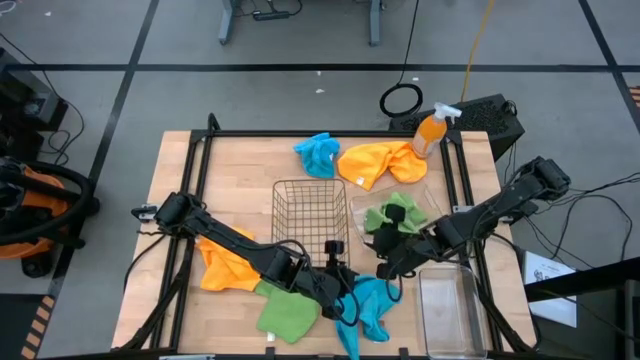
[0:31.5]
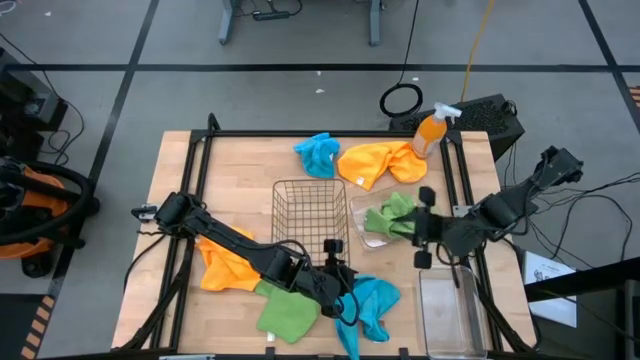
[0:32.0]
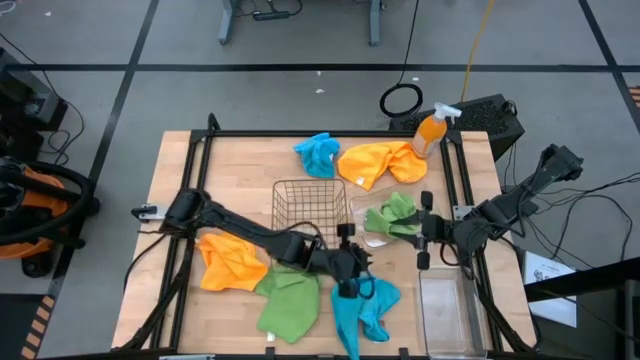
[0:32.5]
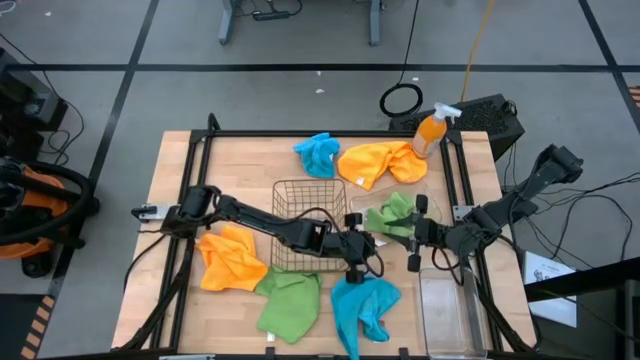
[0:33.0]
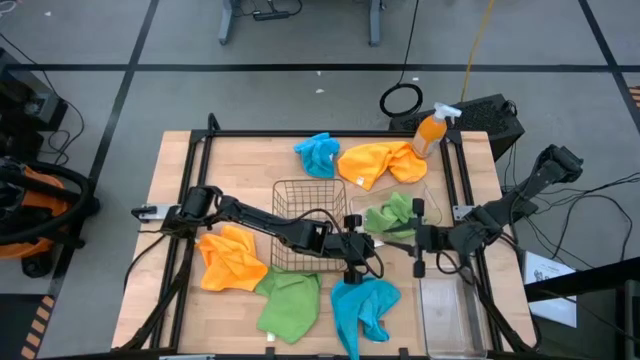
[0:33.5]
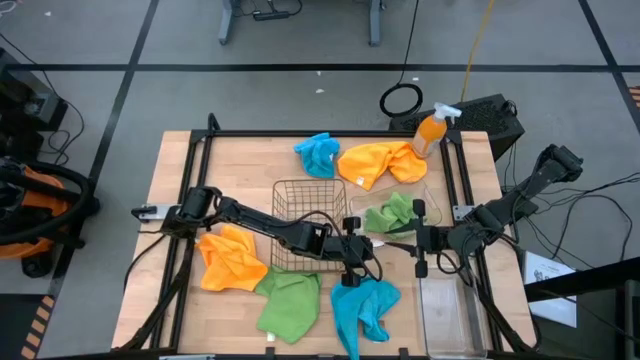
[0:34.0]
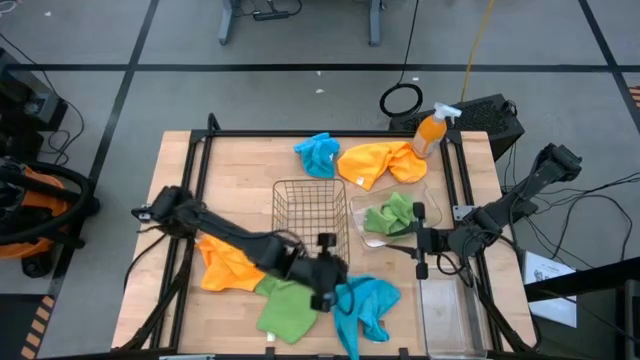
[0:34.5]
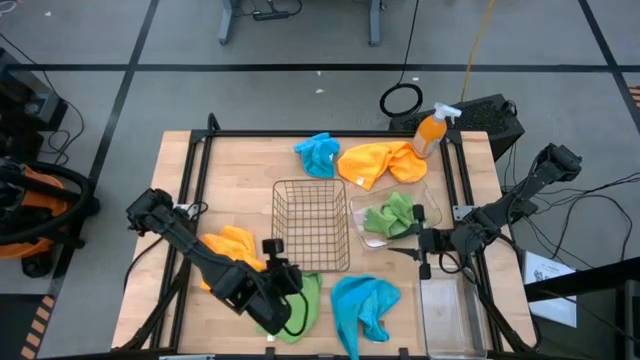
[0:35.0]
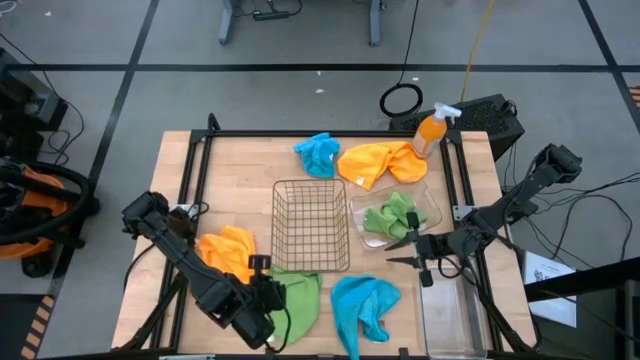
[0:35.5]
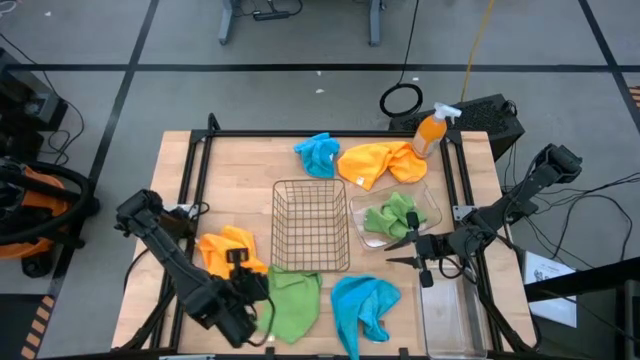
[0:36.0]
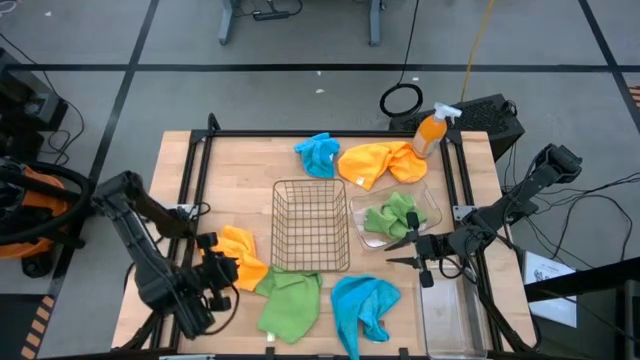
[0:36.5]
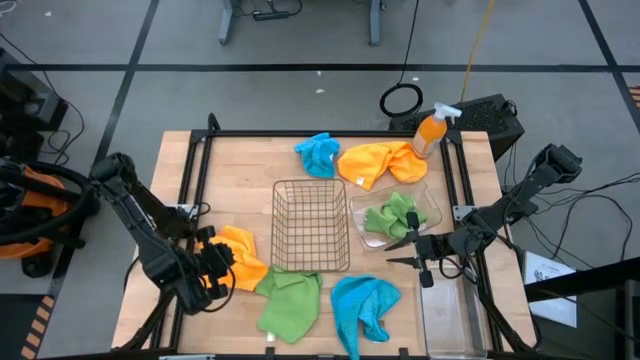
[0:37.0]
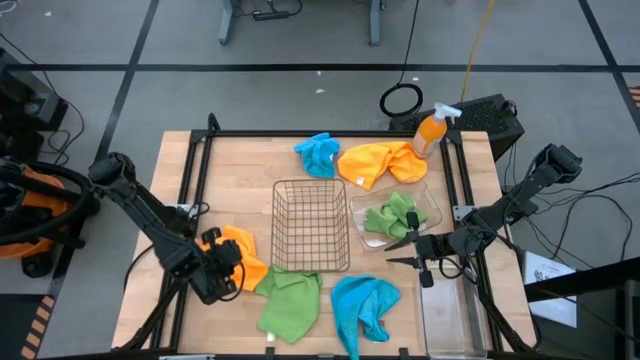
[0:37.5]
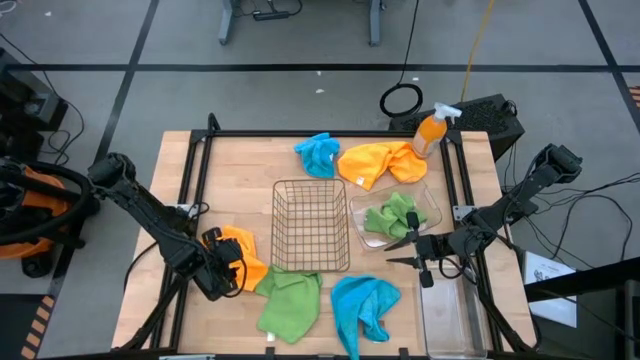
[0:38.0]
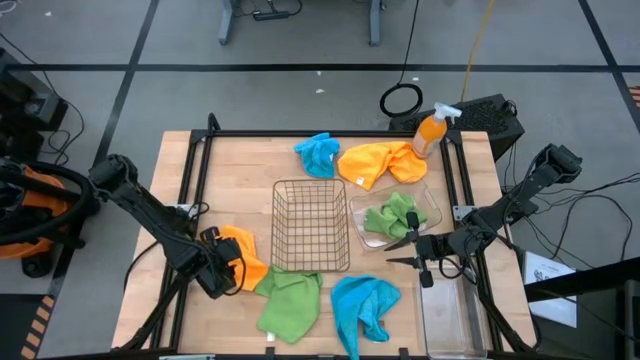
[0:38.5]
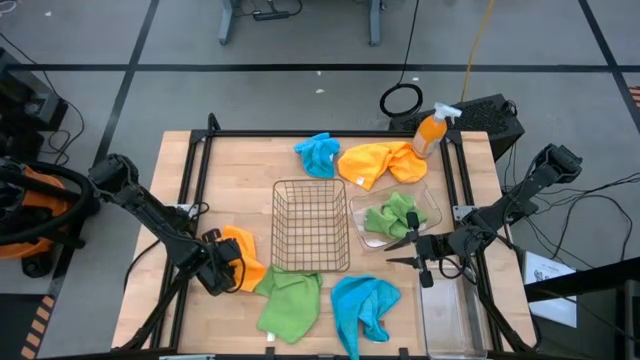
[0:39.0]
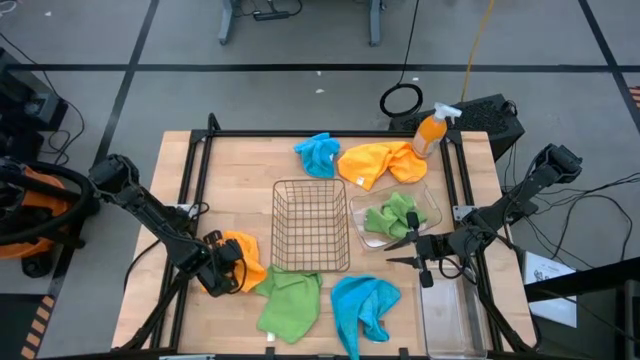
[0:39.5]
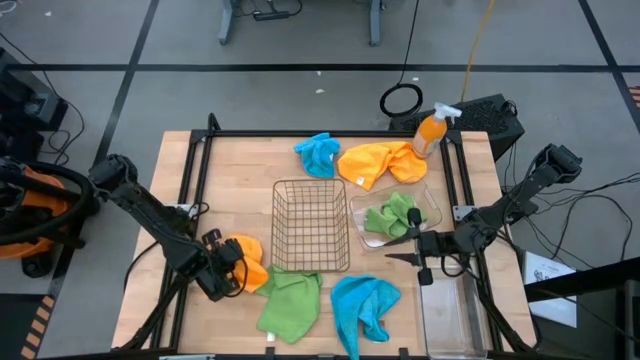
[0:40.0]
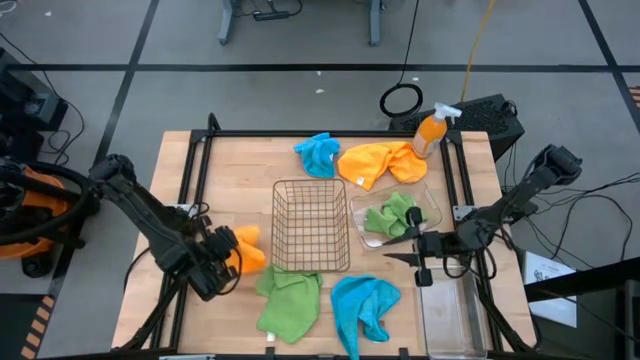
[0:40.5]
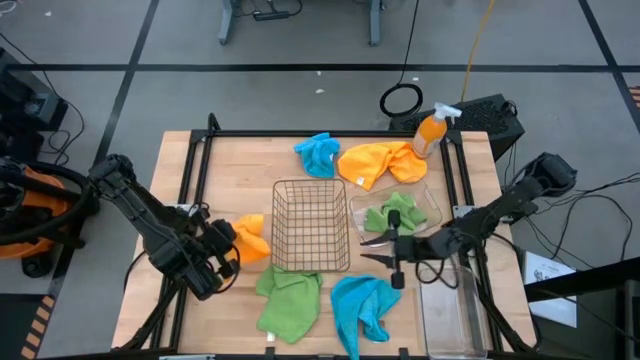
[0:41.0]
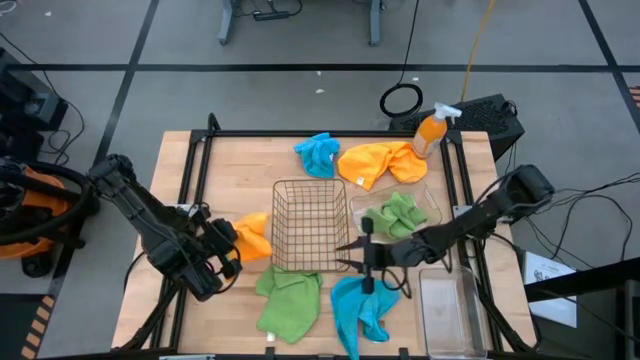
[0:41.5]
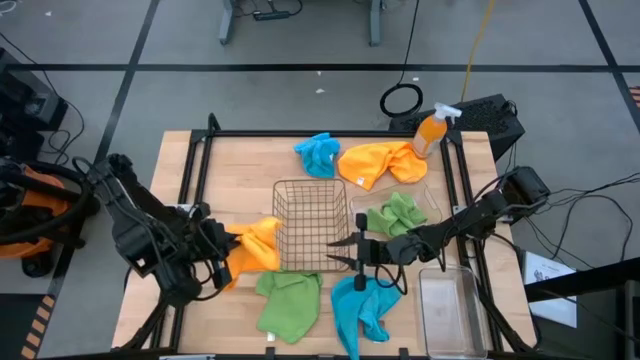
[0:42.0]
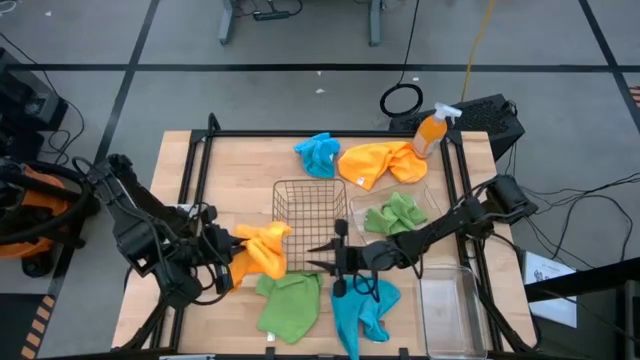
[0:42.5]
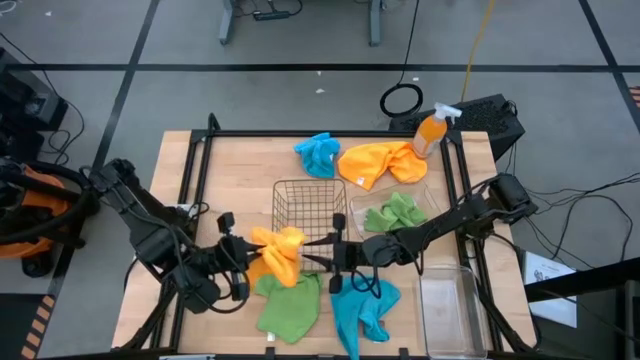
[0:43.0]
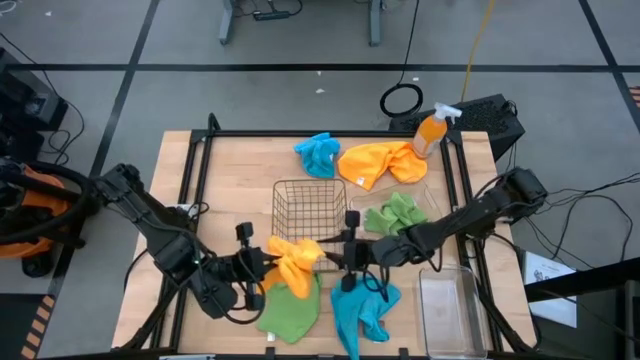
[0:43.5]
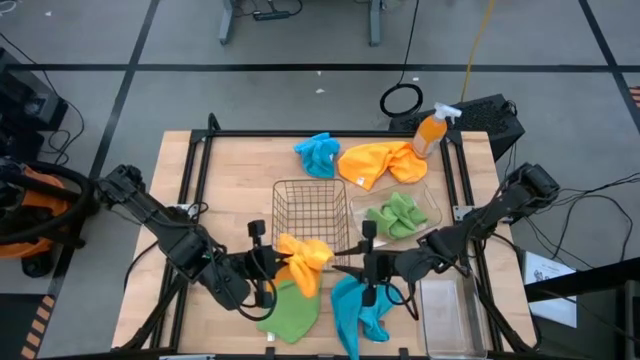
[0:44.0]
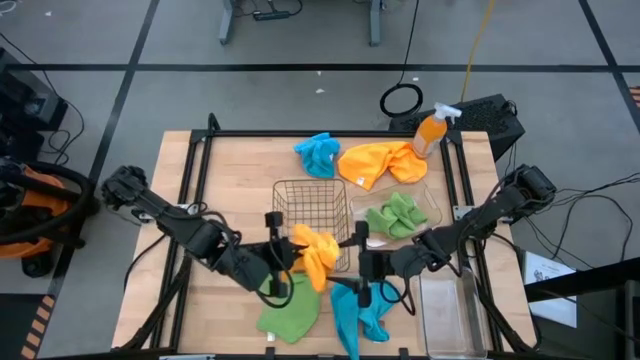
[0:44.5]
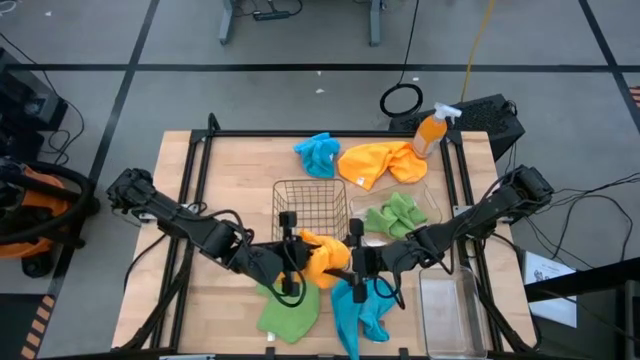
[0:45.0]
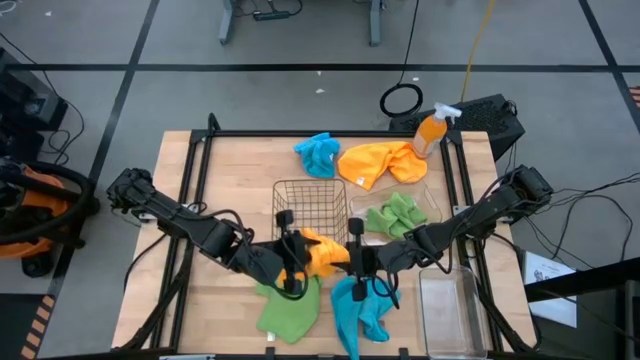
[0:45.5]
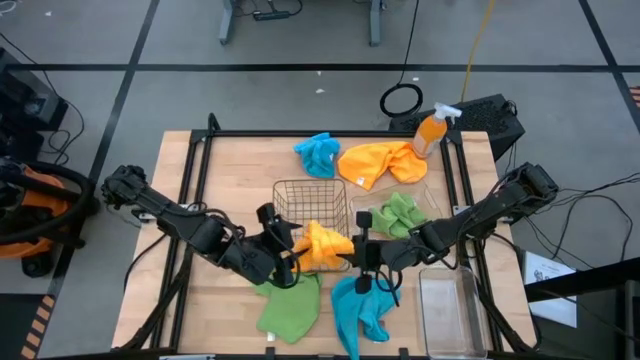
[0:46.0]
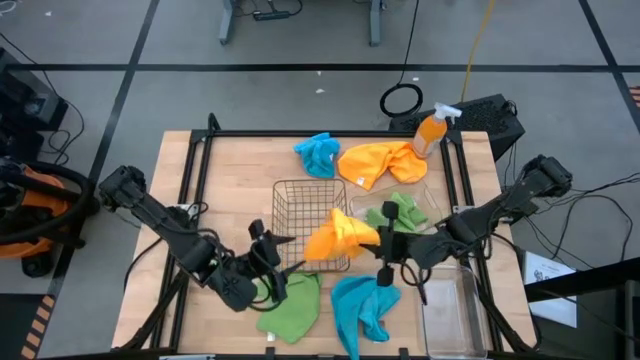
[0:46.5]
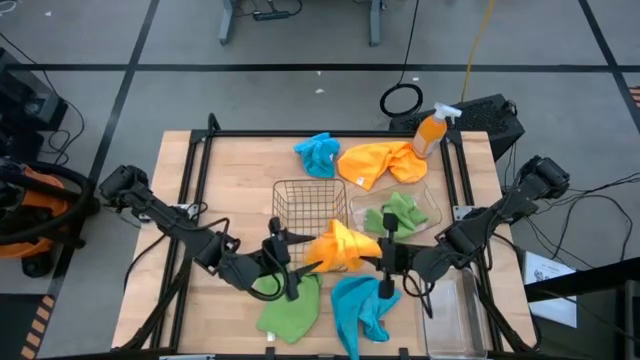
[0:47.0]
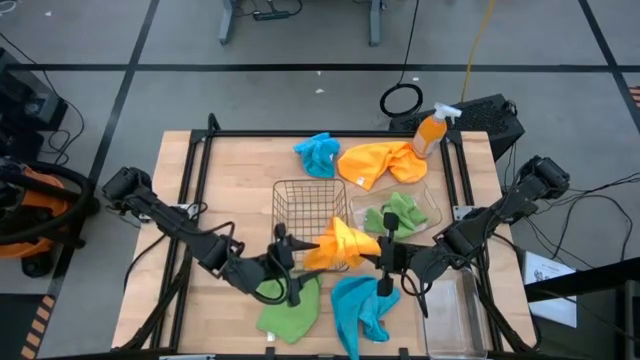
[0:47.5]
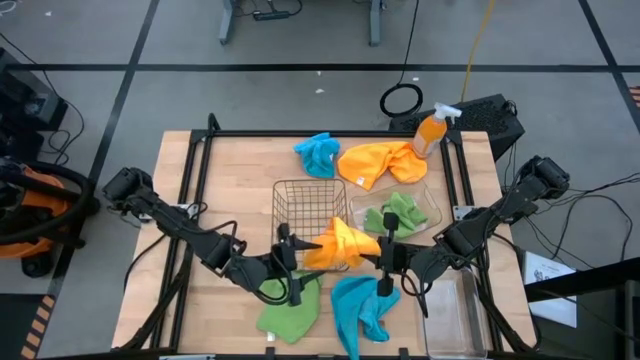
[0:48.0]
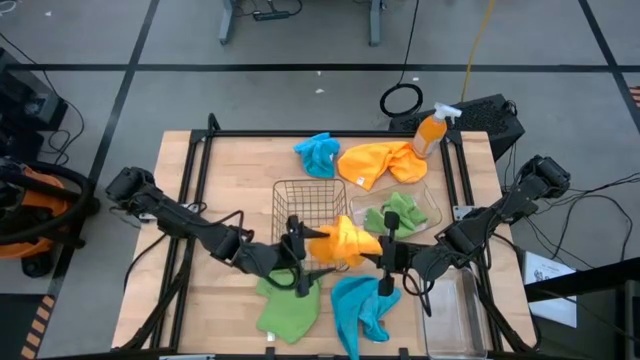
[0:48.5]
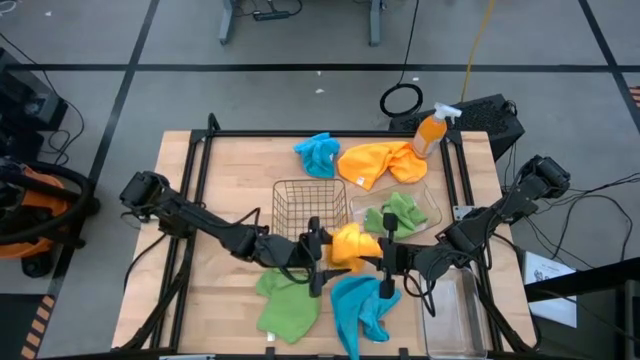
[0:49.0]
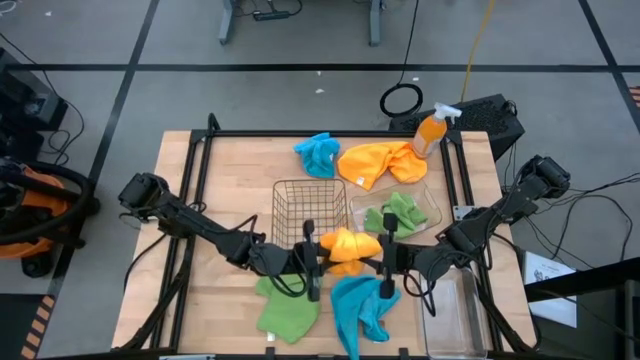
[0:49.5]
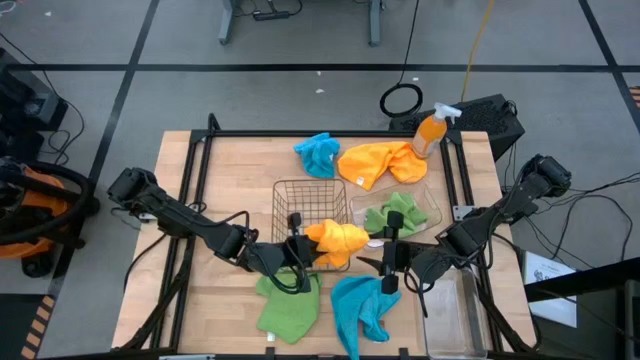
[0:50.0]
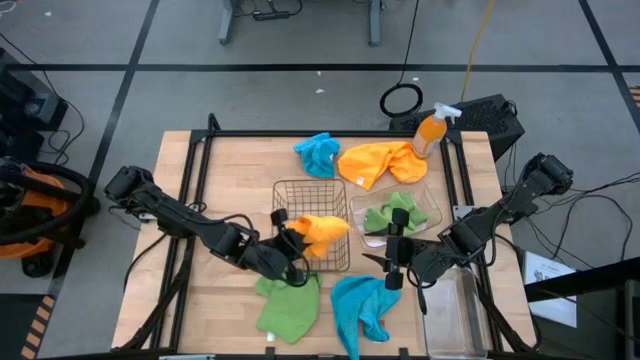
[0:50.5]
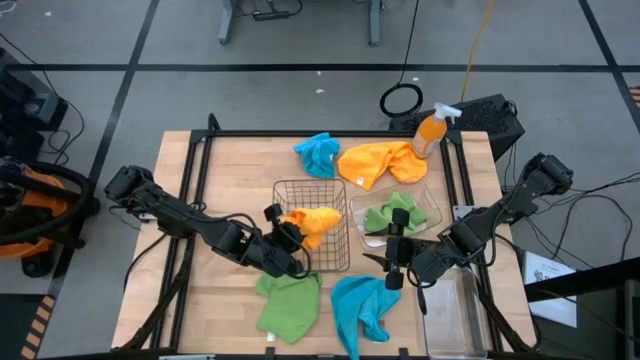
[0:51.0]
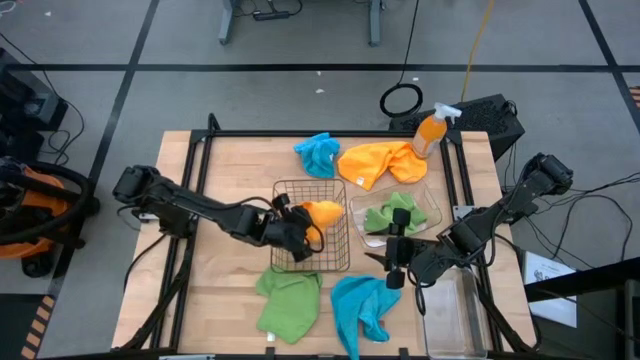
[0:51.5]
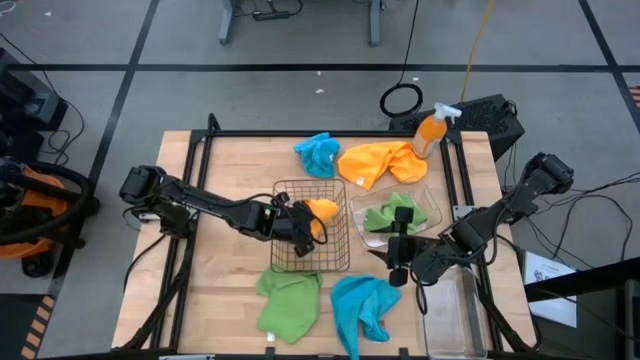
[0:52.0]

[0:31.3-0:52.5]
Task: Sort microfiber towel by color & place in baskets
Put the left yellow towel into the wire basket
